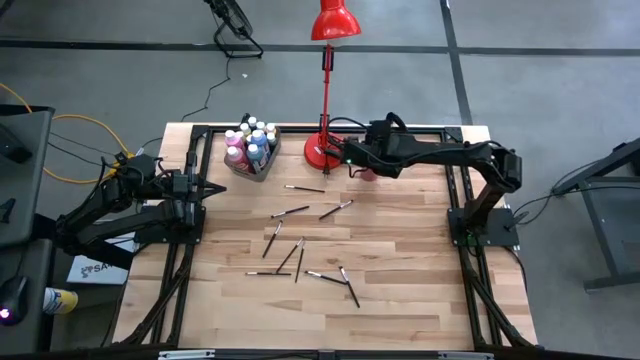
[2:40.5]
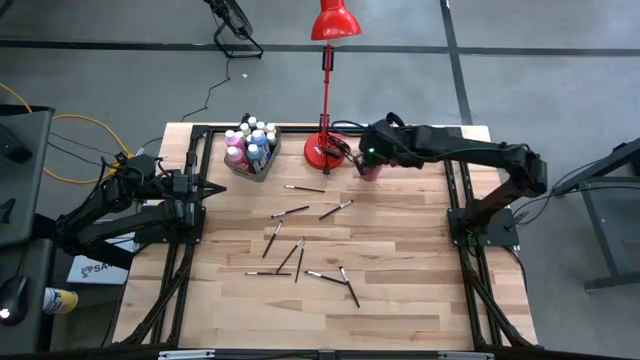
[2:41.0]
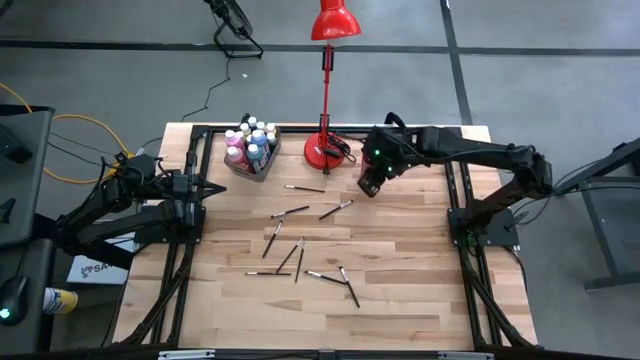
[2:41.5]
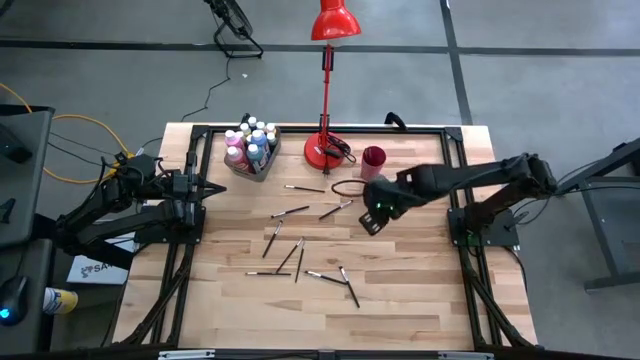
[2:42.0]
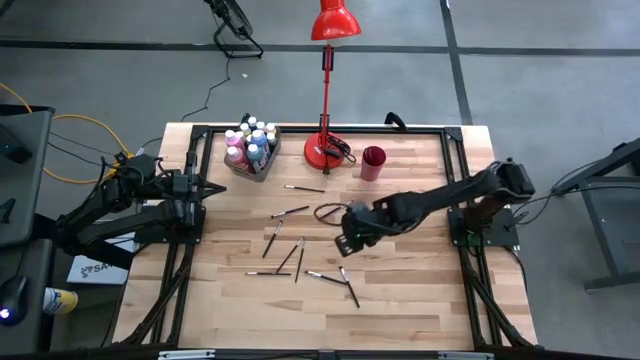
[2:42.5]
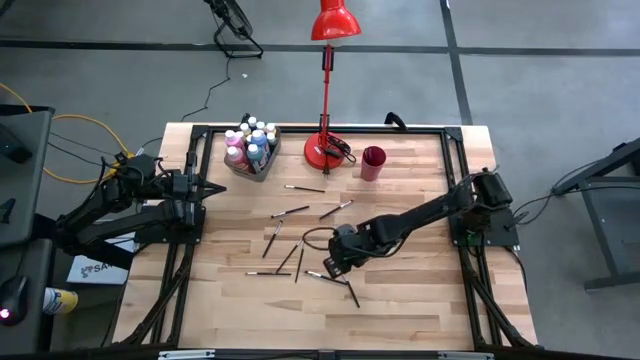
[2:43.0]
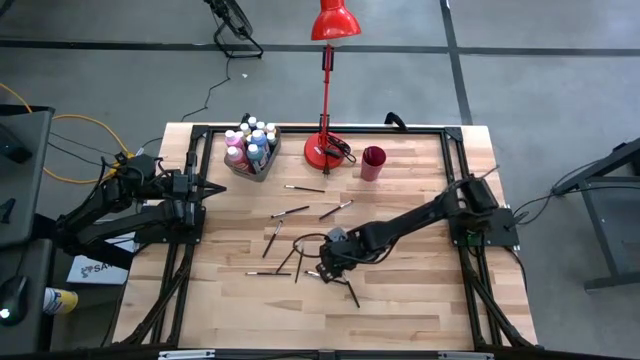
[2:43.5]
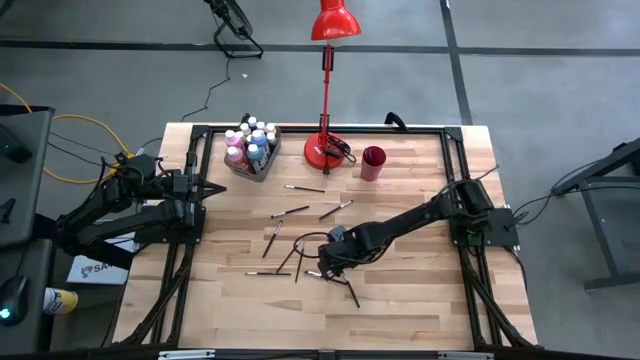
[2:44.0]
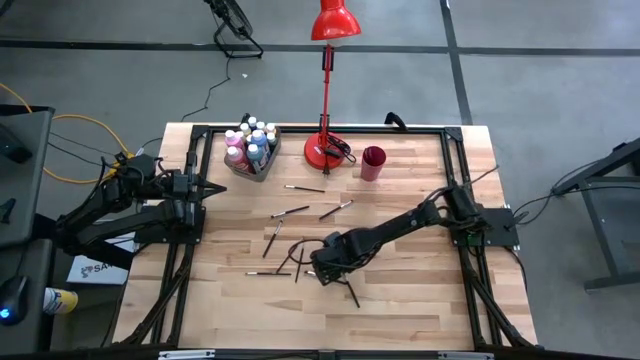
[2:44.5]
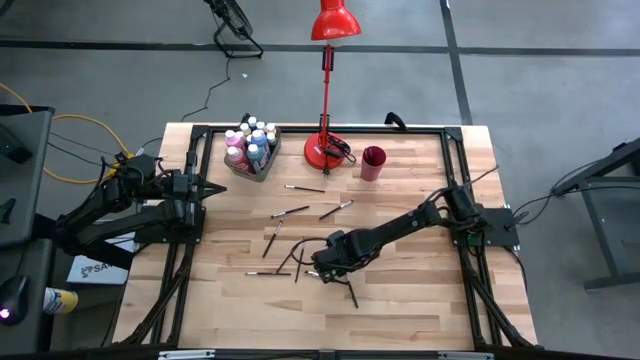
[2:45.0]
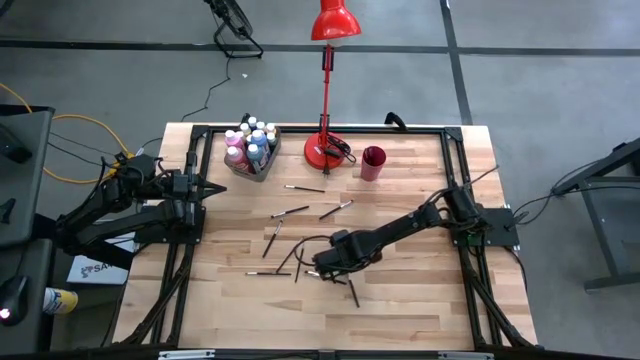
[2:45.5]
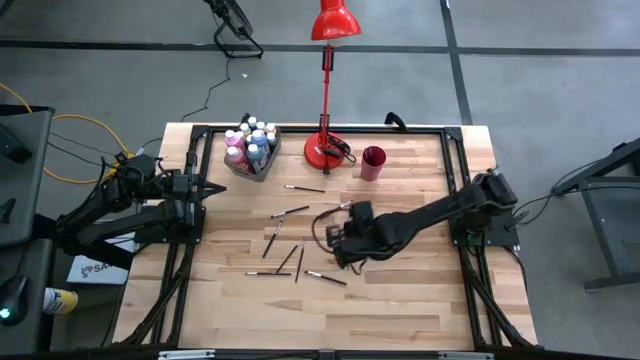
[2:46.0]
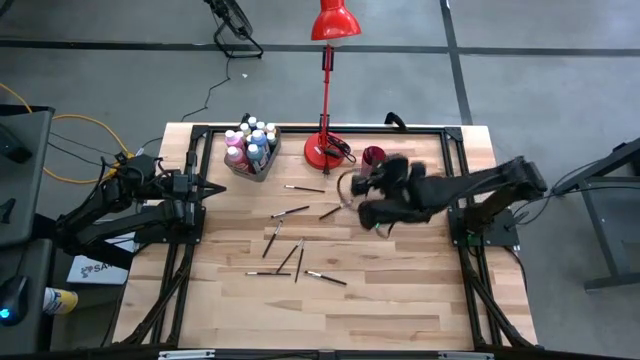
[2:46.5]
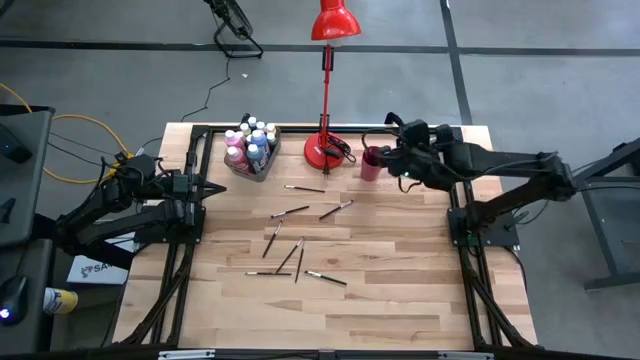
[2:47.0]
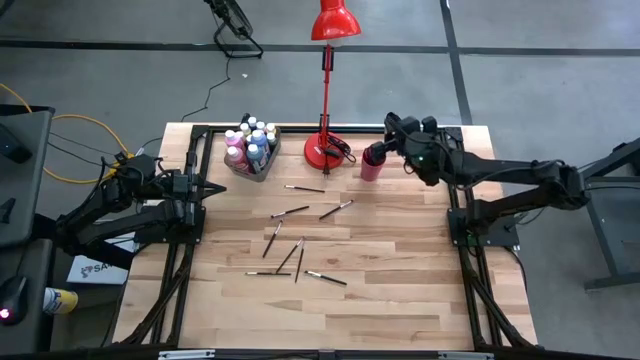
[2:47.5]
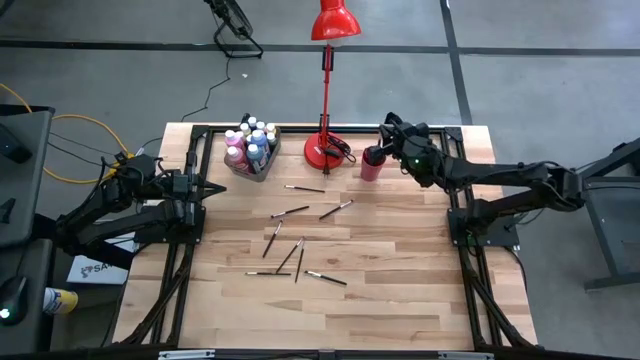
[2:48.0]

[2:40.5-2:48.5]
Task: Pick & Place Paint Supplies
Put the paint brush into the cup

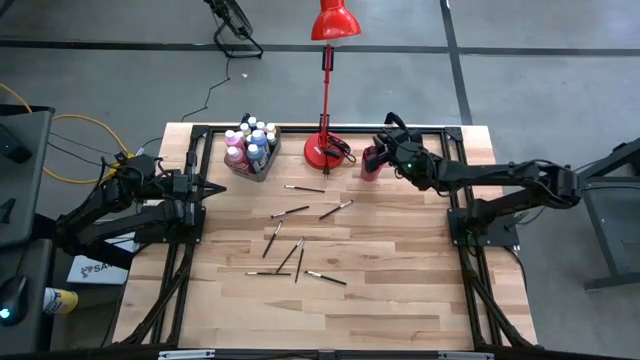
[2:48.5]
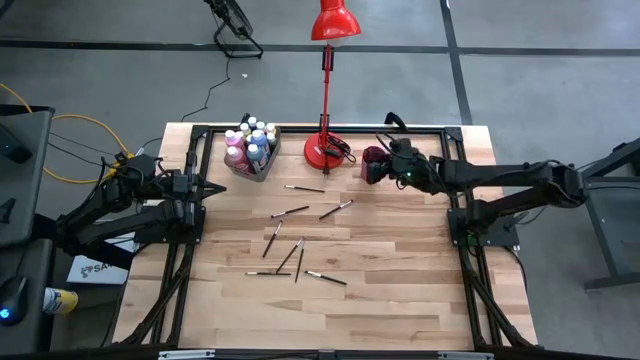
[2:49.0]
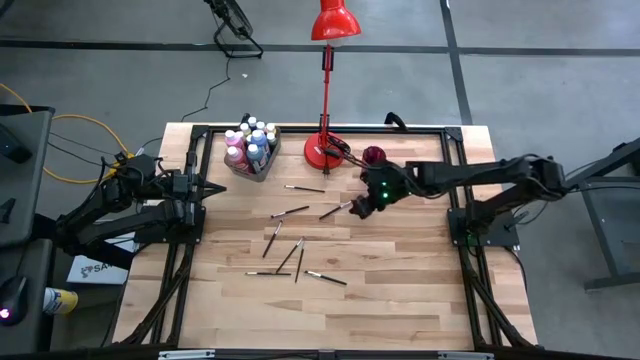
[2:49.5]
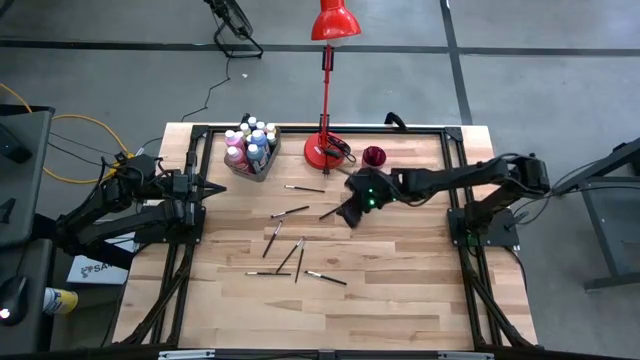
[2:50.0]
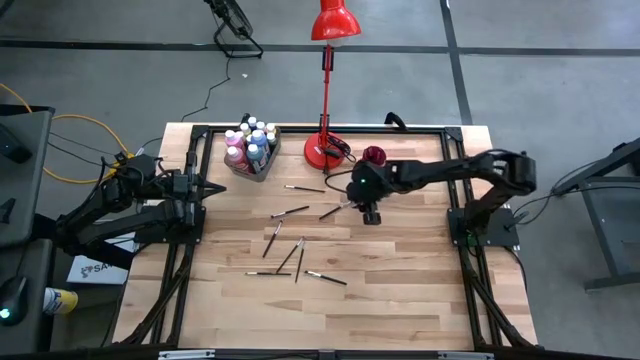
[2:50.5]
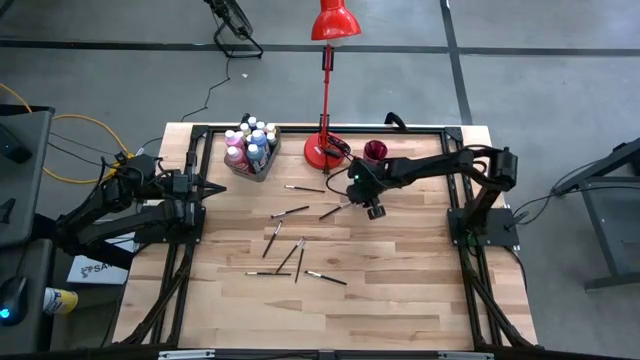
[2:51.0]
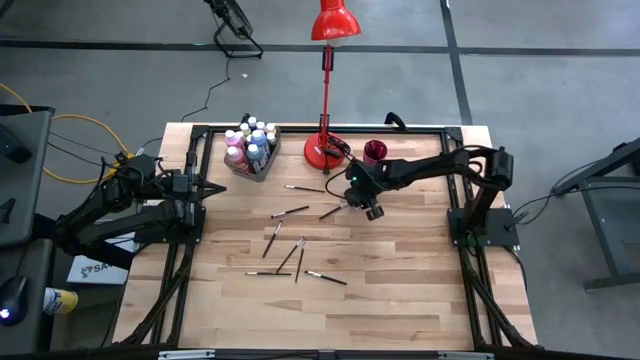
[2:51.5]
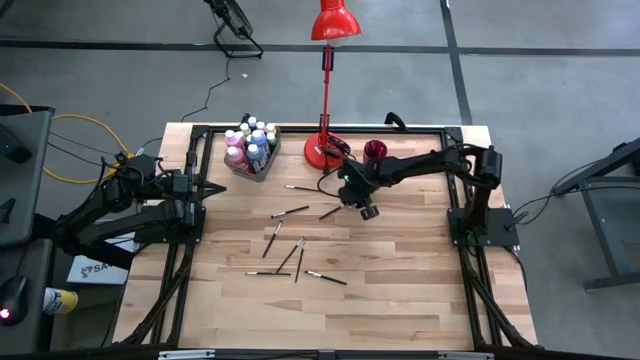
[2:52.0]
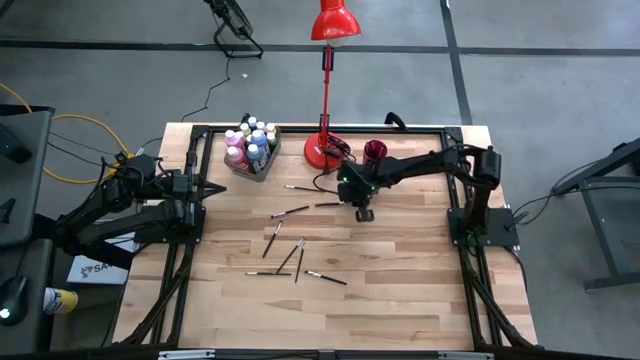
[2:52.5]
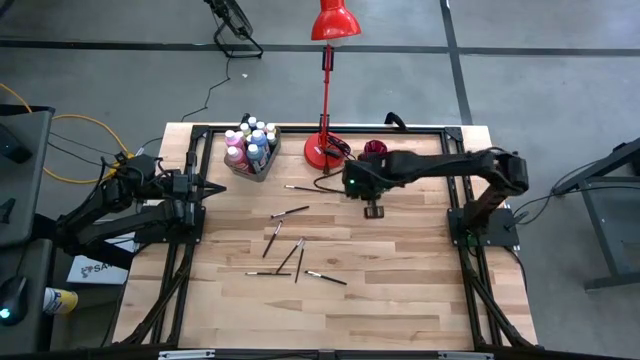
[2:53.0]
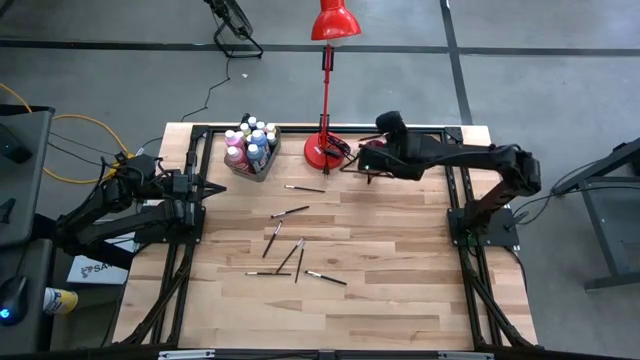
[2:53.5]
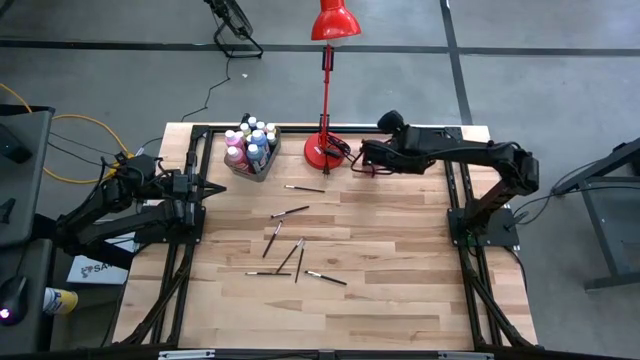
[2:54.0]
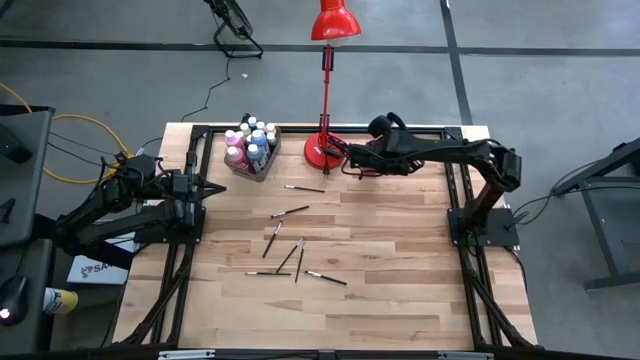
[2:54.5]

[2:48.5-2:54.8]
Put the paint brush into the cup

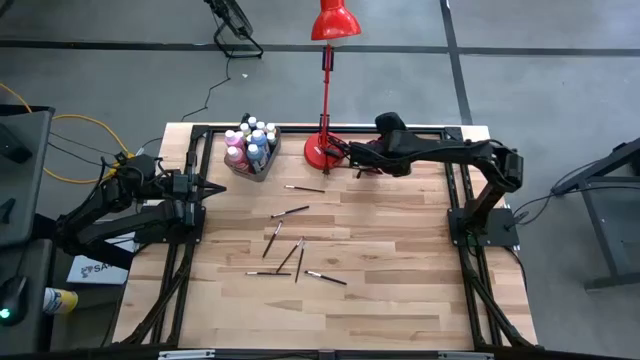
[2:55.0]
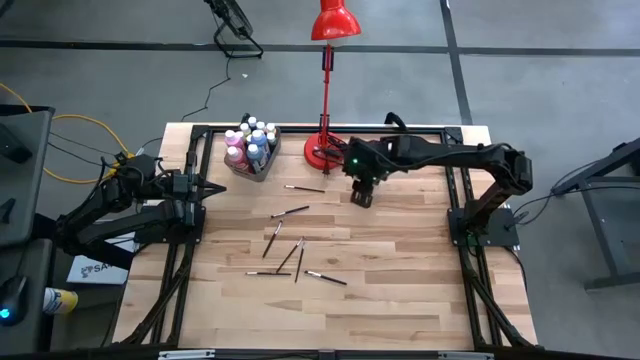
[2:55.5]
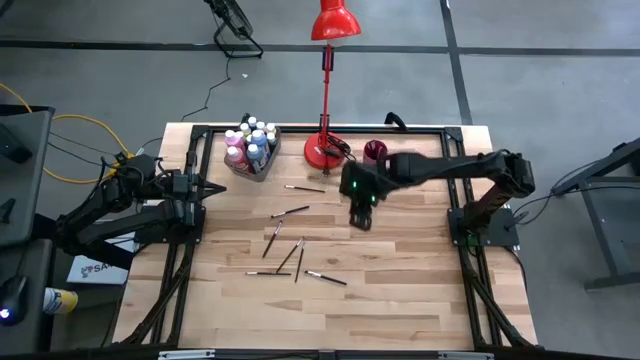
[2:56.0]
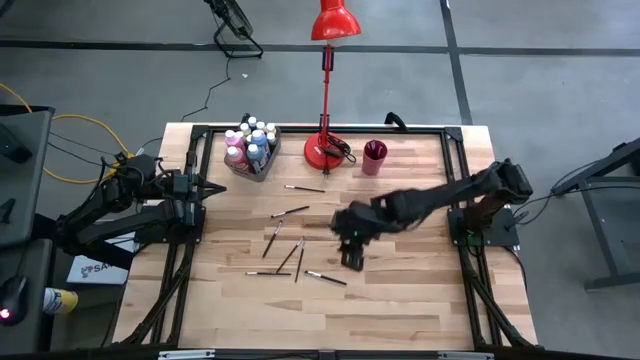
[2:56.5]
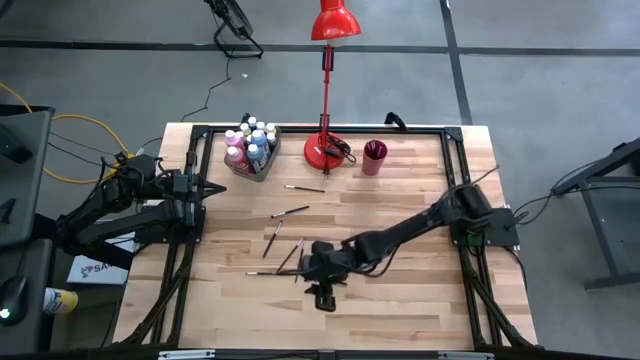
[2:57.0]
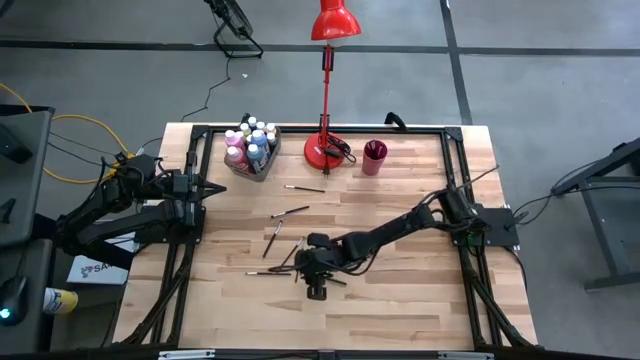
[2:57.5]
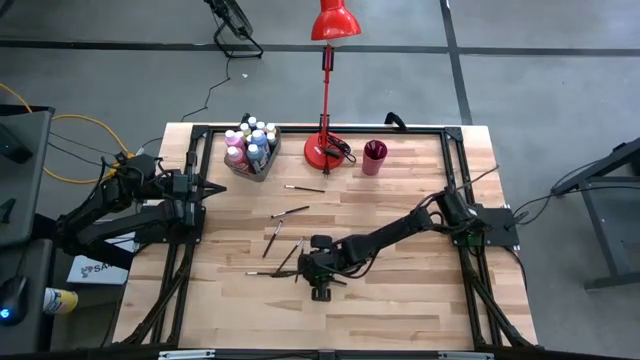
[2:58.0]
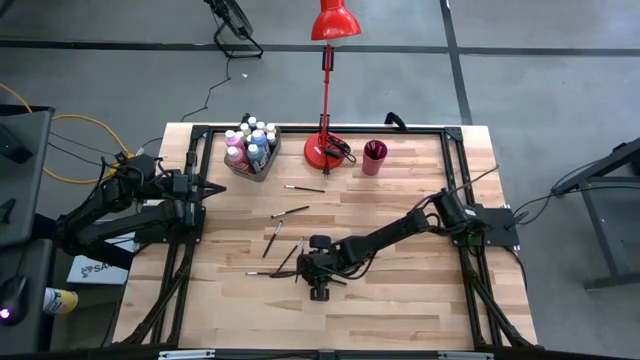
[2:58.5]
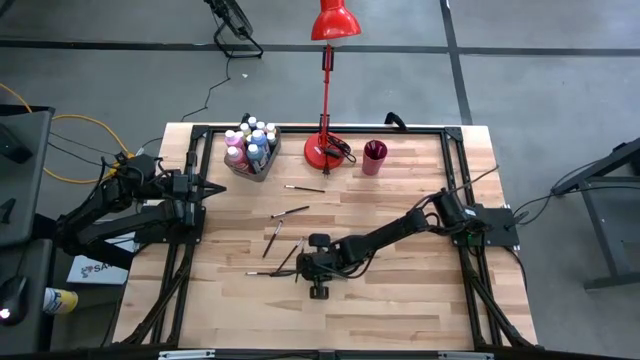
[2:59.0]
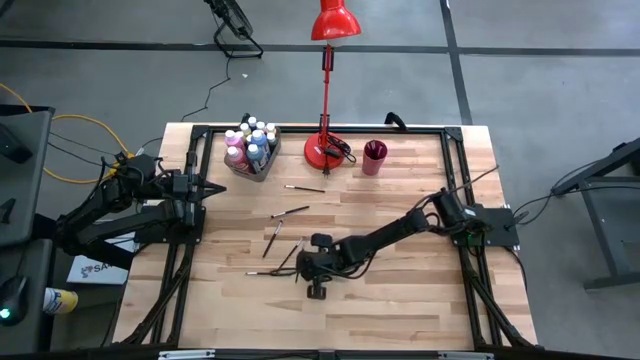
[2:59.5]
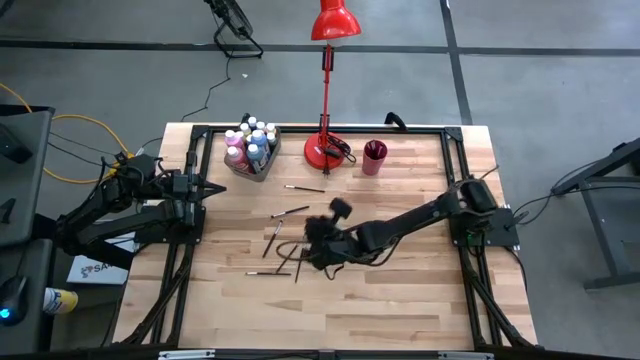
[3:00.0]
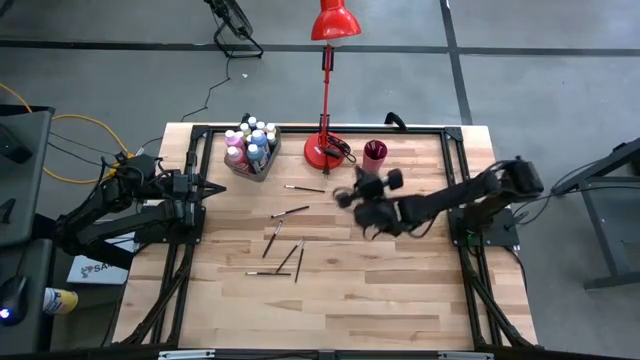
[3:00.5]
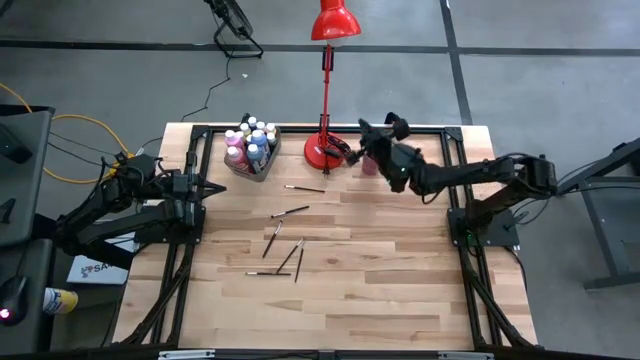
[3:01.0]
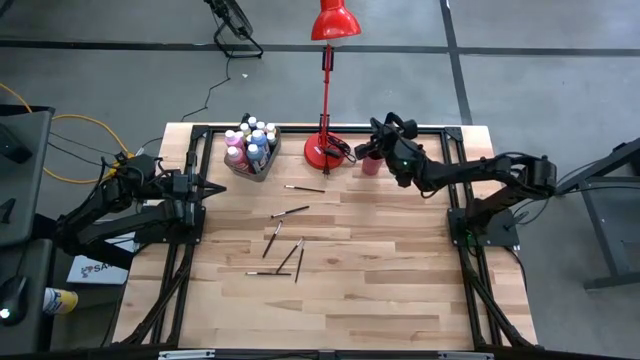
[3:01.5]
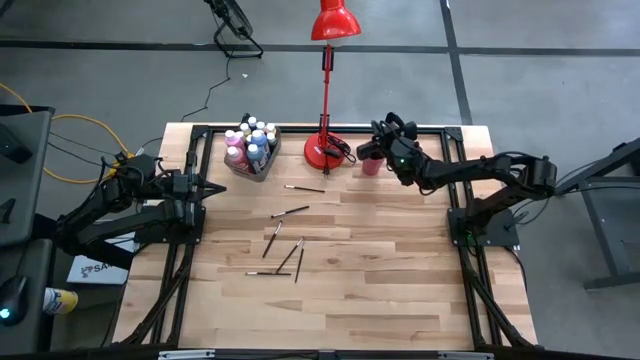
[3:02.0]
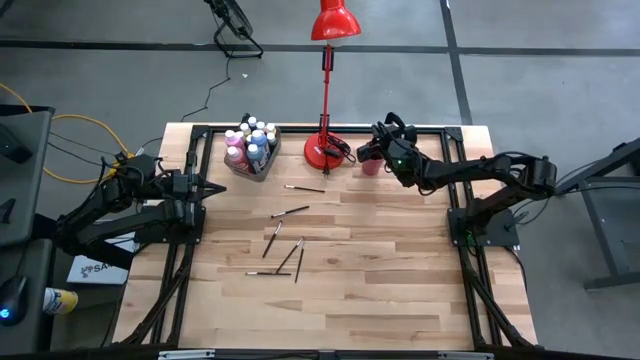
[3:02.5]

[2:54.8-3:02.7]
Put the paint brush into the cup
